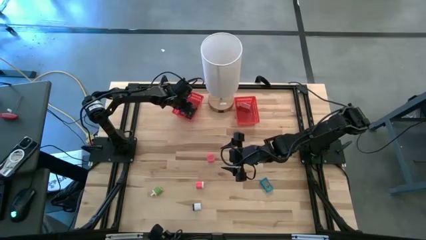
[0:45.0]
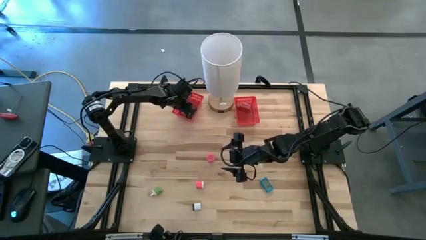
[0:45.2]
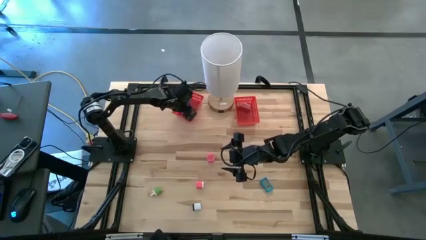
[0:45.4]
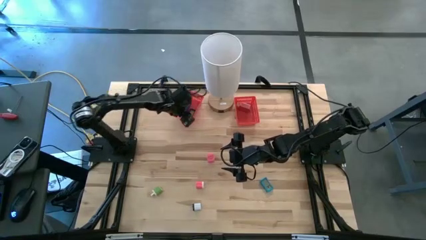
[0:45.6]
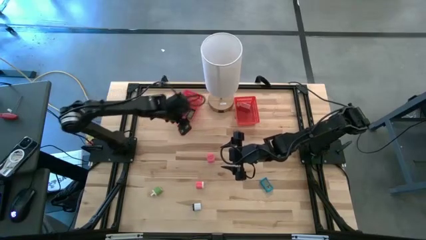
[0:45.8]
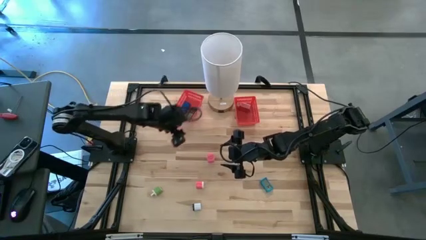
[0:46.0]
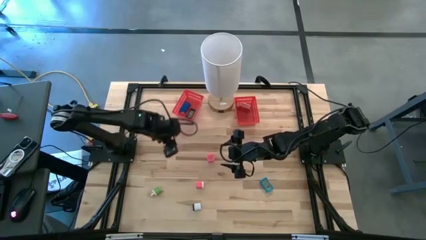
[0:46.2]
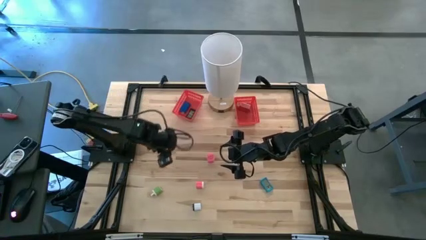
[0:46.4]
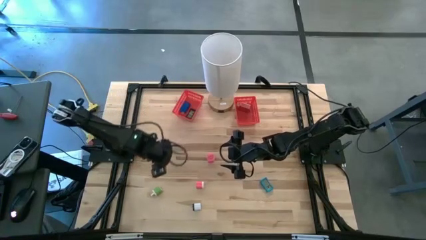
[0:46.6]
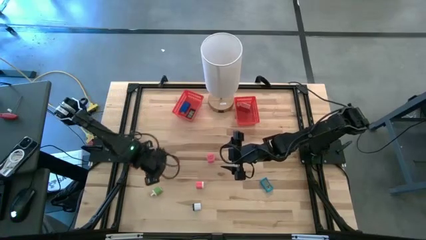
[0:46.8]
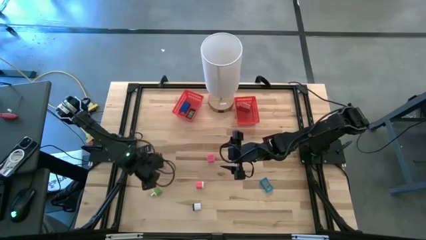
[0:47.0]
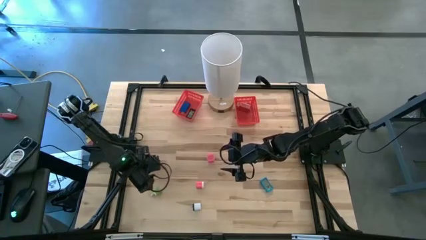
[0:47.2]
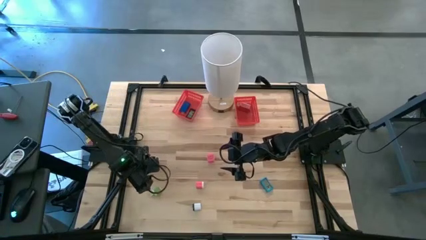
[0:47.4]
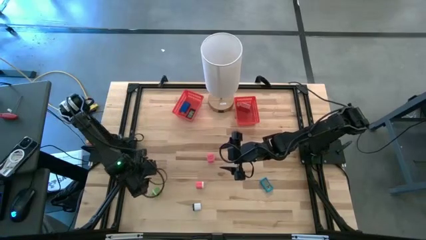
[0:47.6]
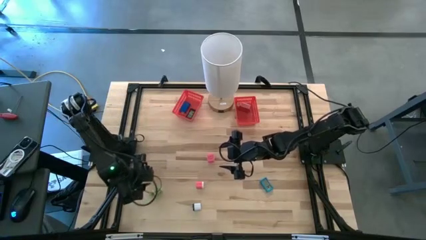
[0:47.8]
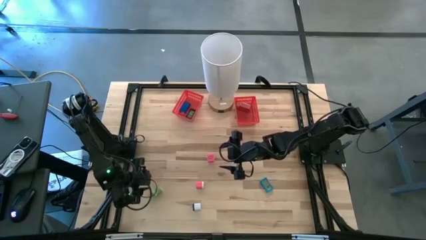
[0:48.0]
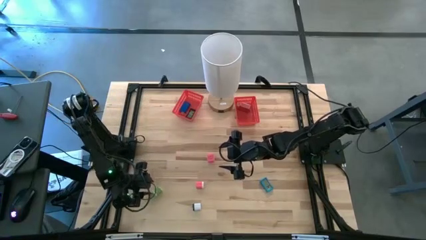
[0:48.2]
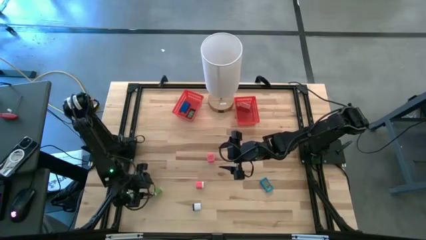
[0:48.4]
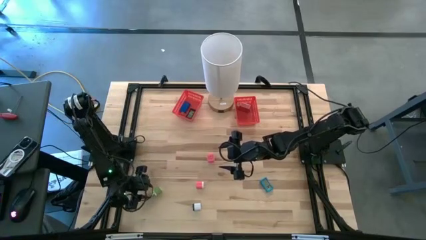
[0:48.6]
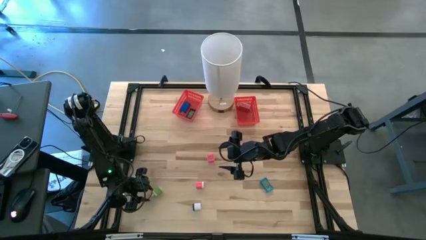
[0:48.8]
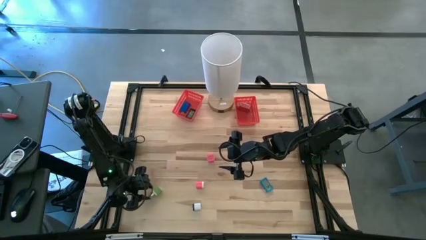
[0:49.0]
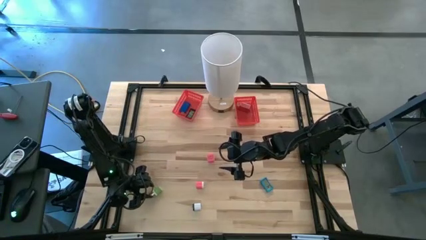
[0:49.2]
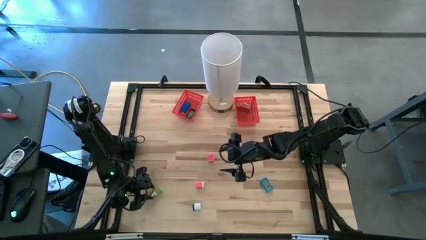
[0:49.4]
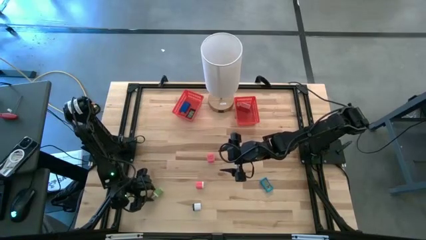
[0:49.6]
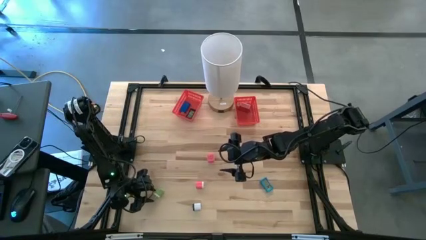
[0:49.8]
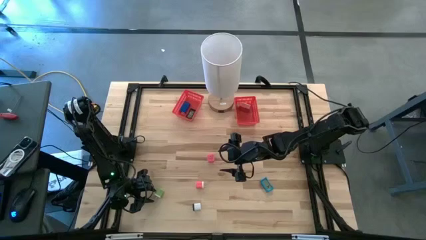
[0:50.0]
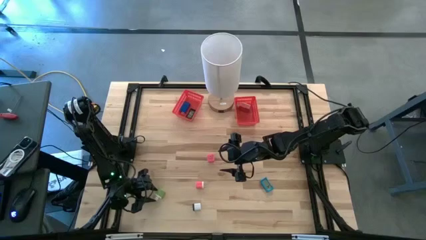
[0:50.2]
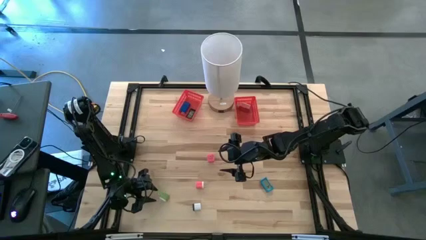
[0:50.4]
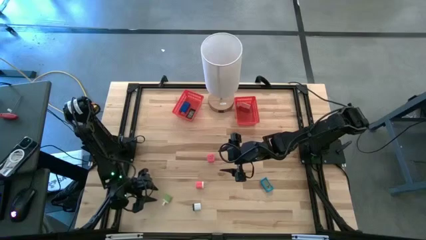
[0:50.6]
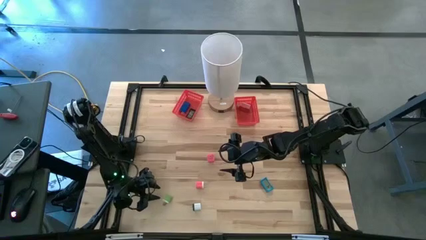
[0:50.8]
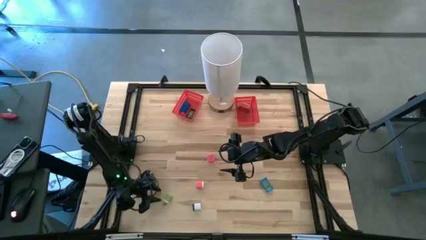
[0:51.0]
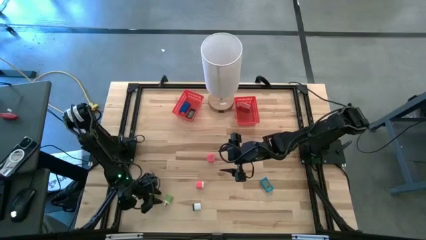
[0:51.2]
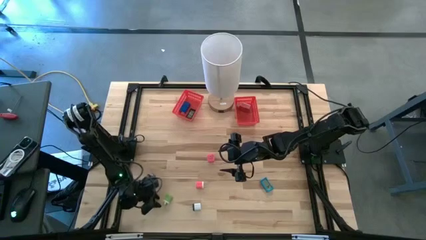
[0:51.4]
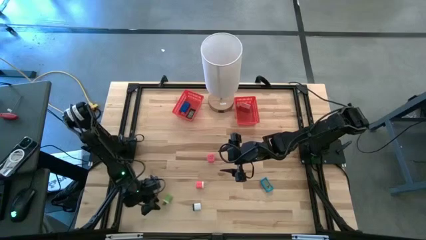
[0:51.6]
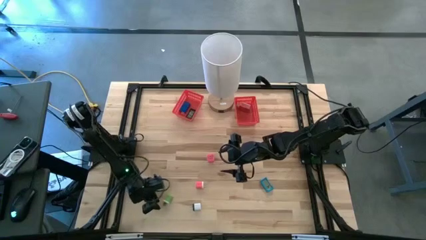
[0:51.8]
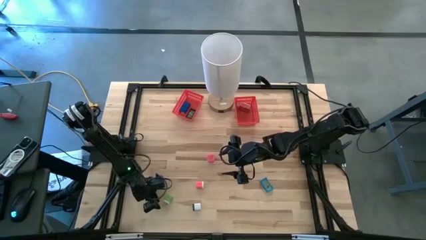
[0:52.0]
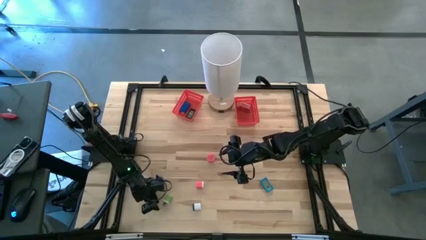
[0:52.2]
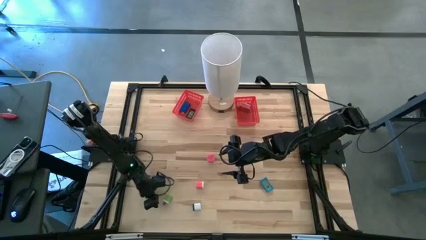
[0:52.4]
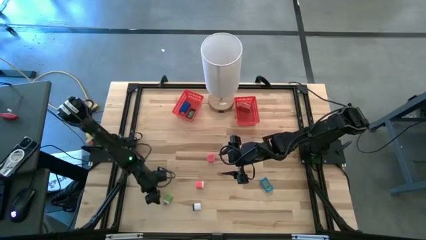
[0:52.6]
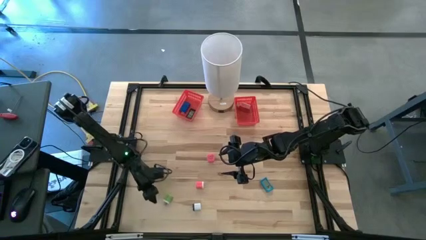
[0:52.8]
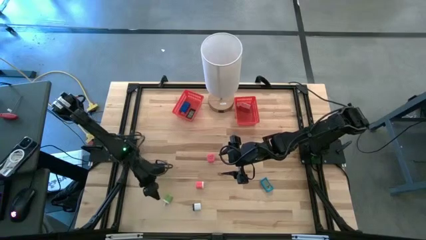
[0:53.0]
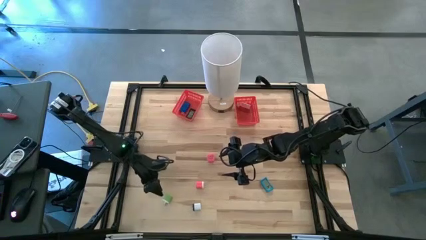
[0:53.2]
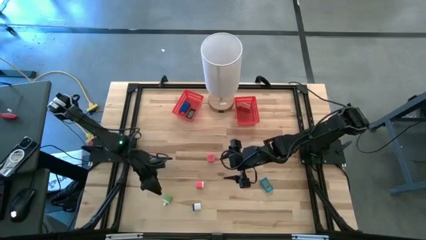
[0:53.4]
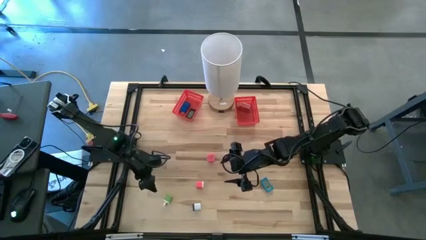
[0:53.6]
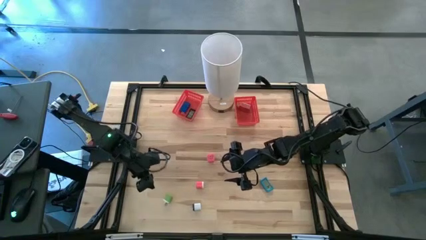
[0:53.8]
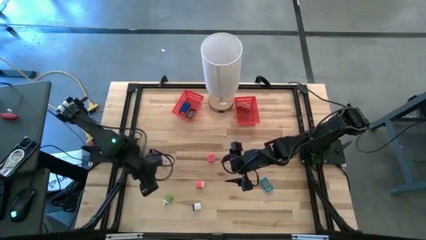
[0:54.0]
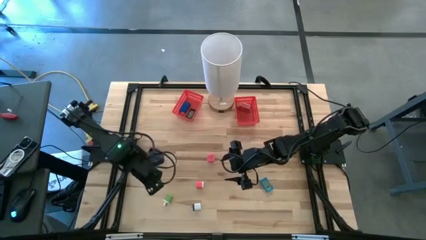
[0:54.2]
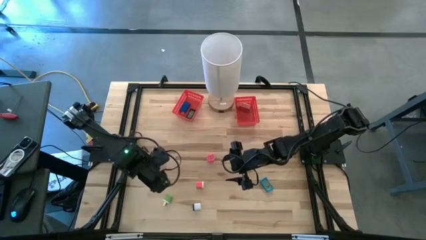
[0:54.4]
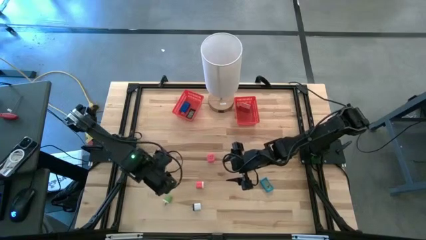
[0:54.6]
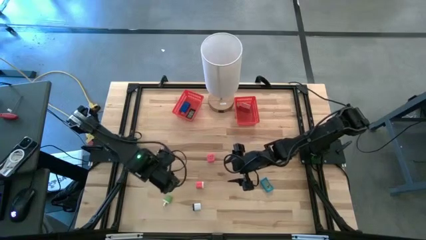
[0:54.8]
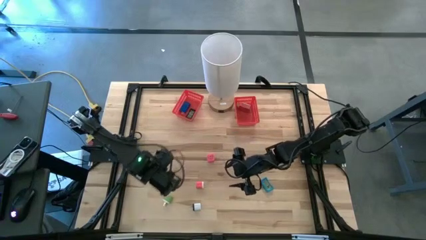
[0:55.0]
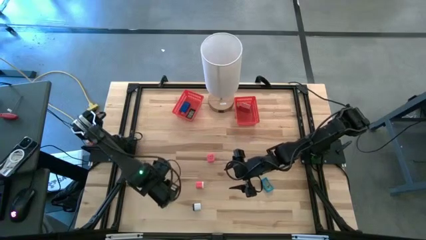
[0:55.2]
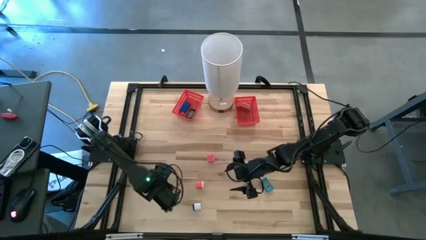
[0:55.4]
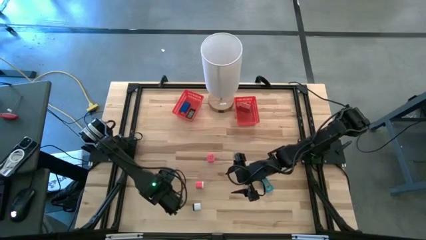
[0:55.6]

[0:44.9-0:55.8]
Task: Sort adapters and digital timers
Put the green charger adapter into the right red bin
